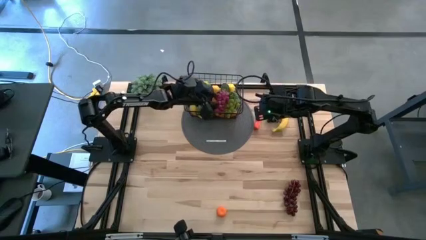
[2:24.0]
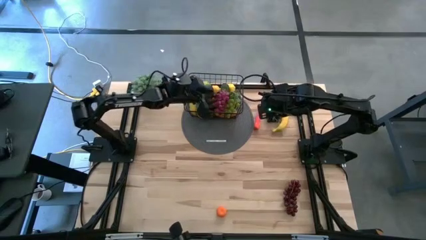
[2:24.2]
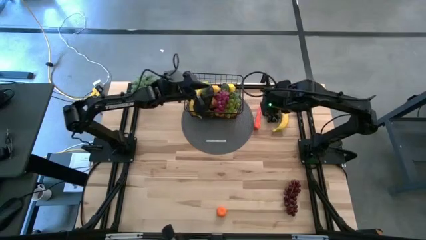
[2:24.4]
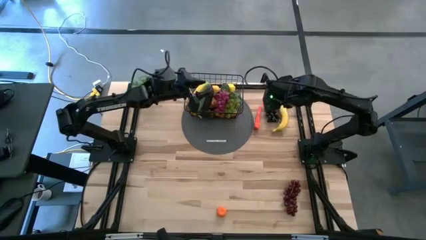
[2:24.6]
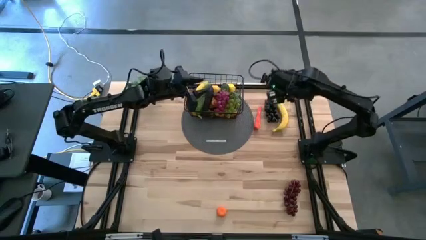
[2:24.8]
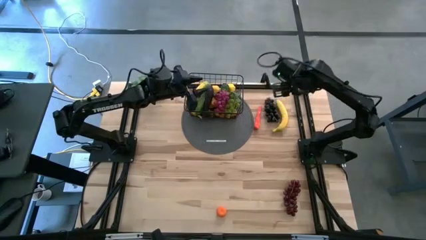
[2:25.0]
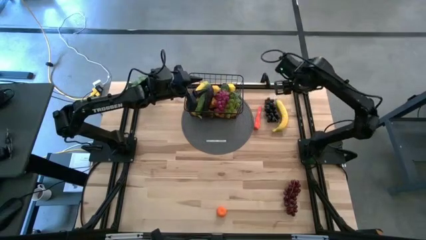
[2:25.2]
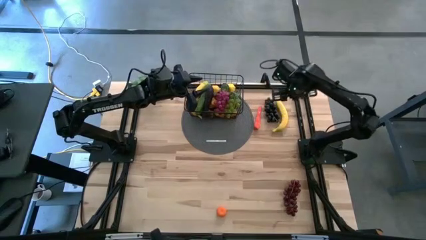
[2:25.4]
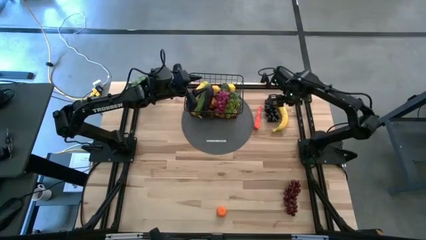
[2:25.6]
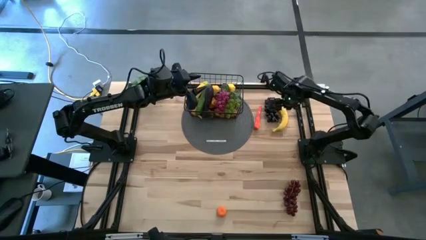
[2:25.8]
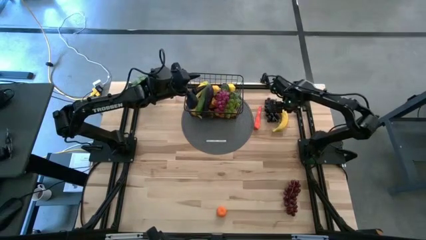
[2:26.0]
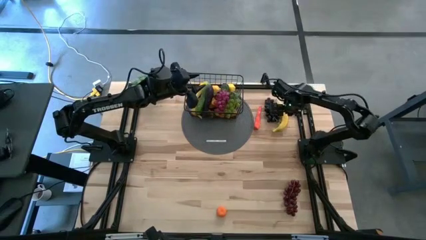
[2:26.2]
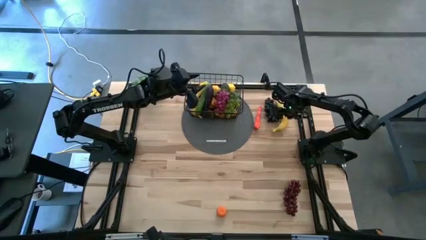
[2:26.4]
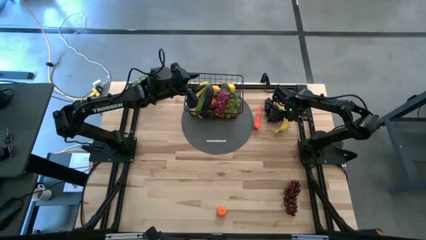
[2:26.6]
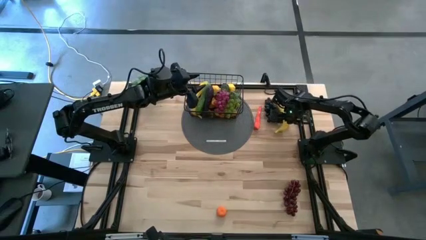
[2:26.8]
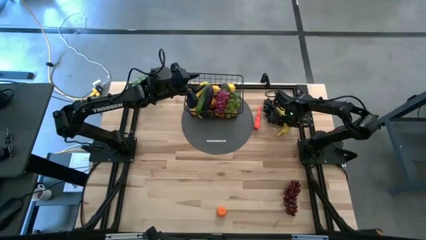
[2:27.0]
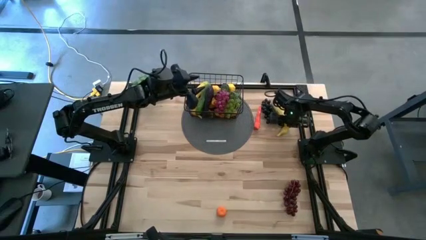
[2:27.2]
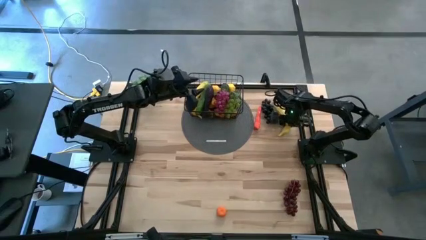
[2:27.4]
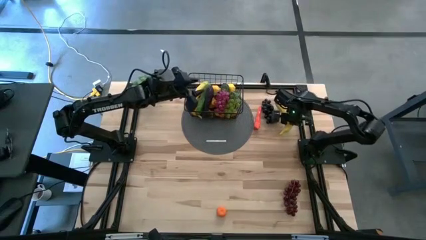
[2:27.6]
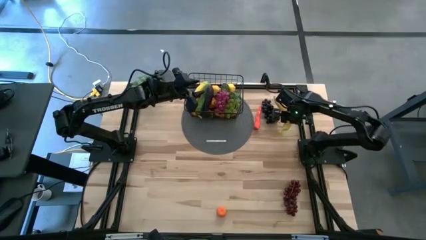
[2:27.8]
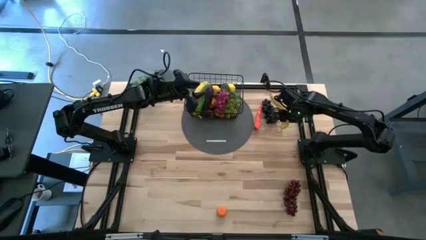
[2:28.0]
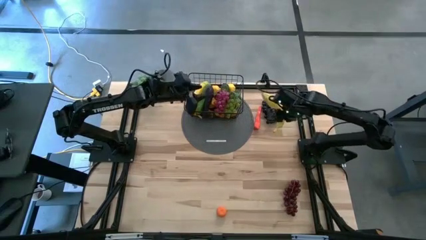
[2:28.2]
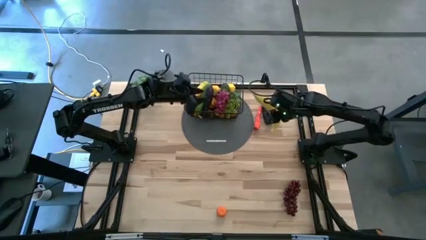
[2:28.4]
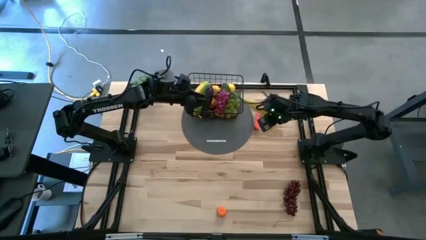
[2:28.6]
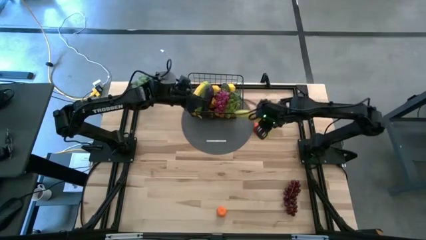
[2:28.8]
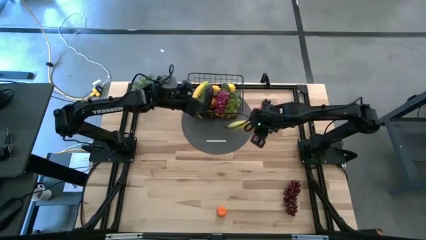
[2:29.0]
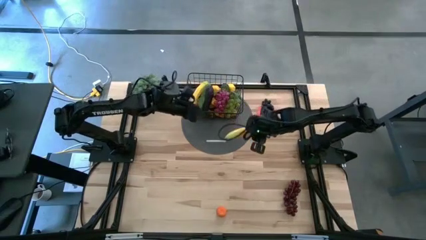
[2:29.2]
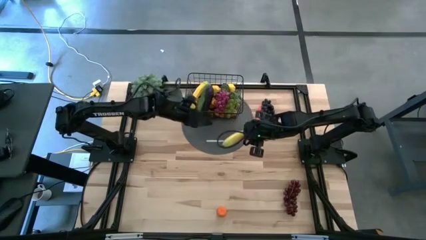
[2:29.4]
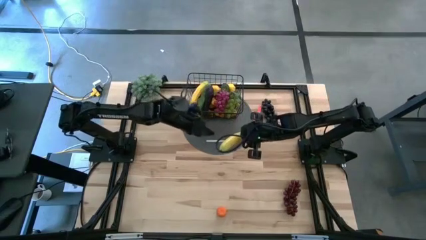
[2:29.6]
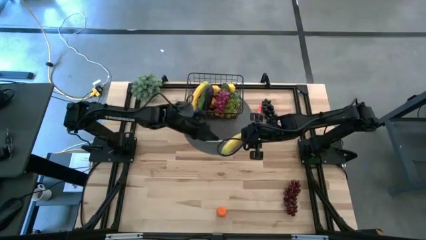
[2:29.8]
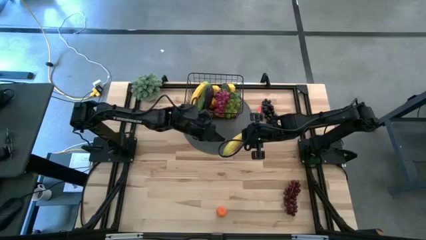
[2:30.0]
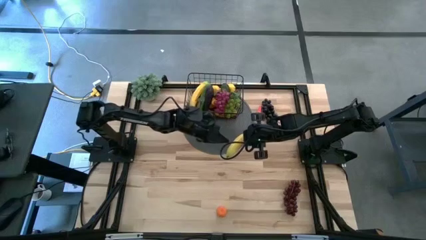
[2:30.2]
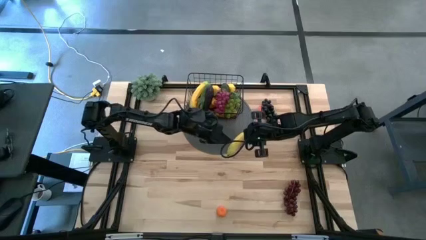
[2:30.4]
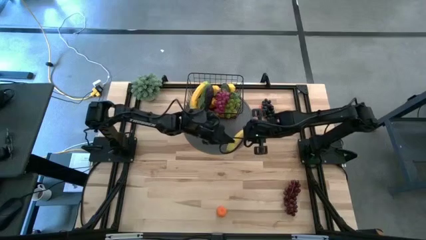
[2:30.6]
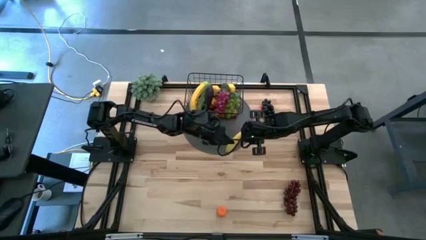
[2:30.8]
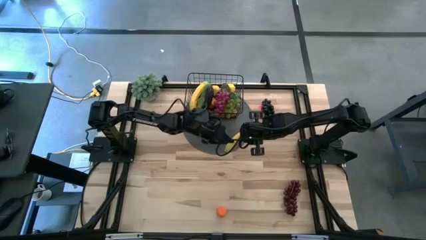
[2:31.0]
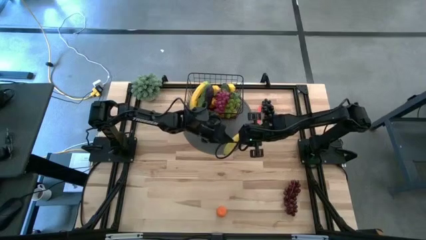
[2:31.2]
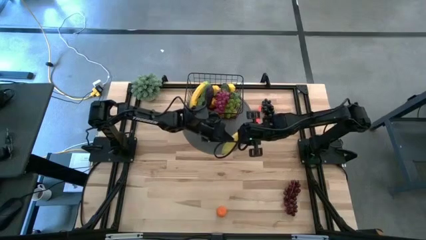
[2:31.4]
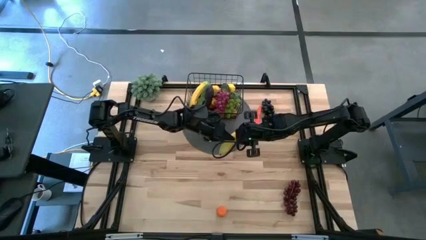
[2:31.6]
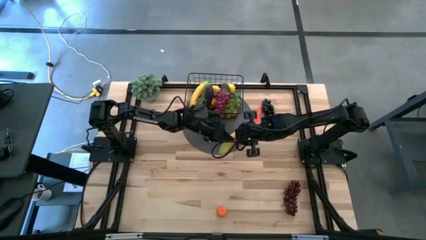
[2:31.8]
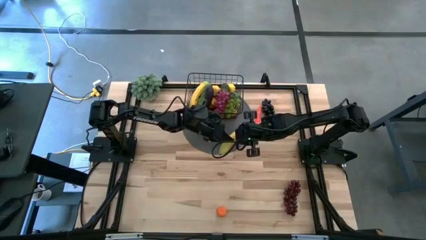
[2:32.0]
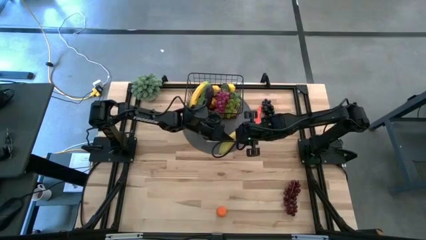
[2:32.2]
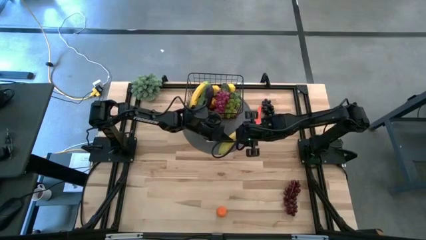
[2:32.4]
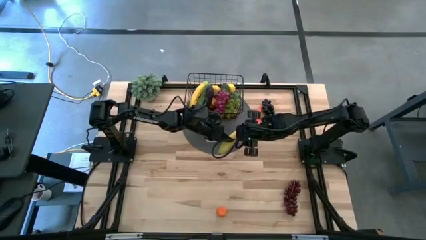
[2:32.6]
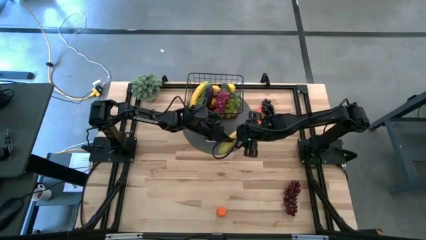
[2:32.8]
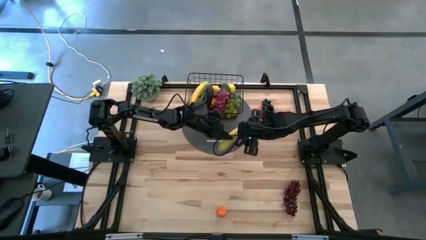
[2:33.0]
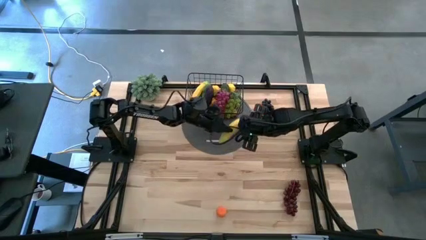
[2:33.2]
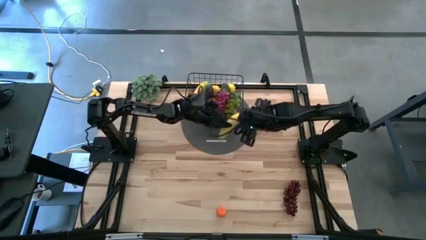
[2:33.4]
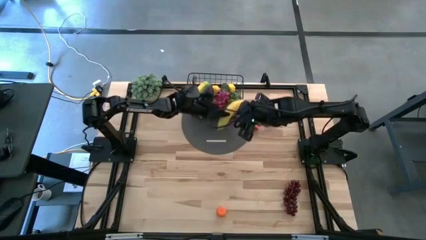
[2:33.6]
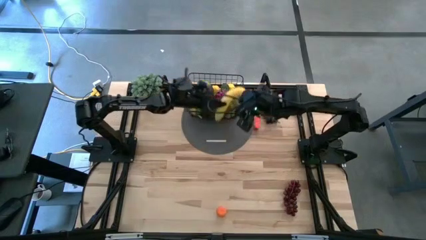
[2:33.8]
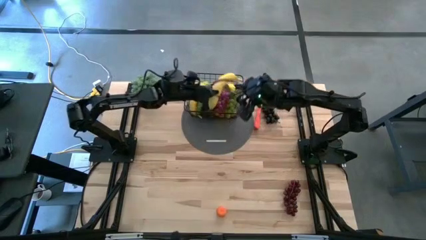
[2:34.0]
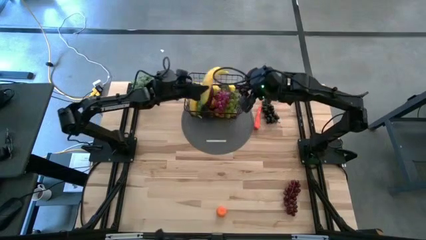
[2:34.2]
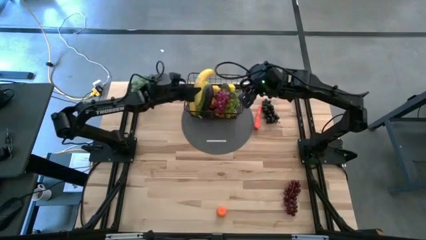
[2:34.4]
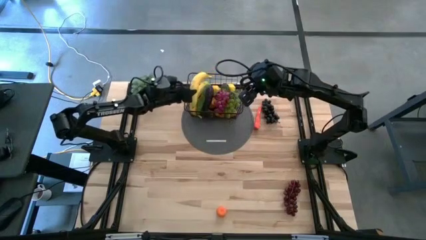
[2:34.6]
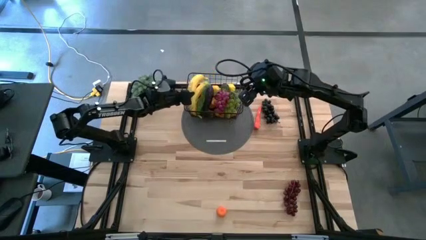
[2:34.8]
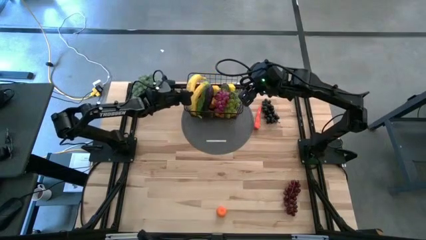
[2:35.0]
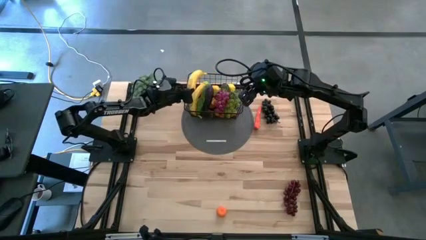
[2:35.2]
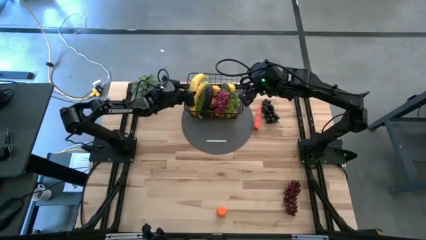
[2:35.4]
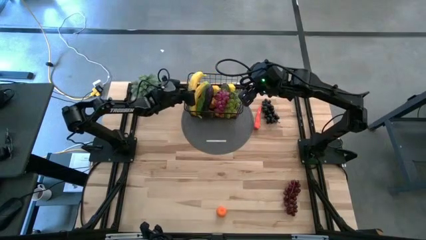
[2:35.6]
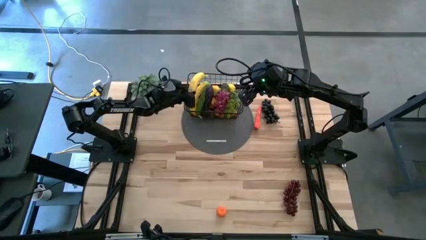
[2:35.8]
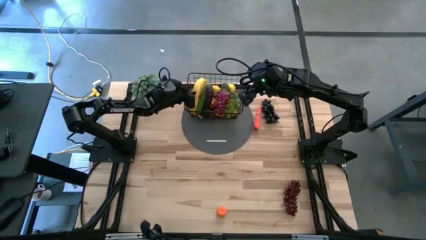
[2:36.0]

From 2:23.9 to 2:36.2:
Task: Build produce basket
Put the banana into the black wire basket

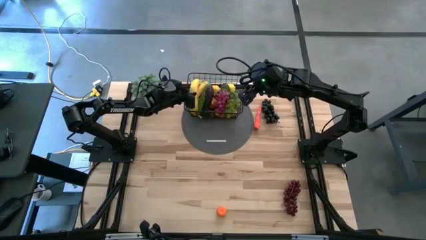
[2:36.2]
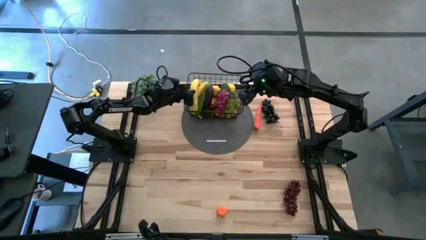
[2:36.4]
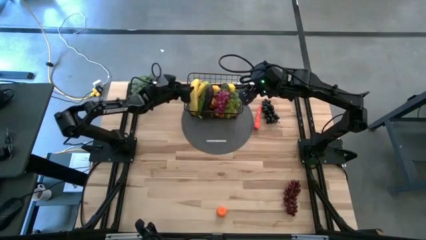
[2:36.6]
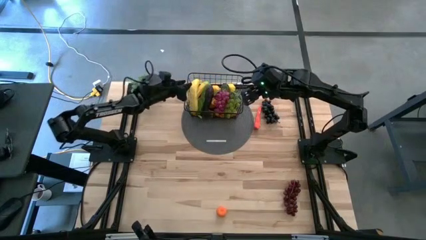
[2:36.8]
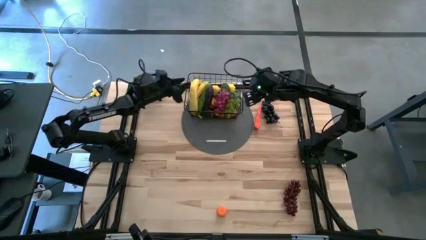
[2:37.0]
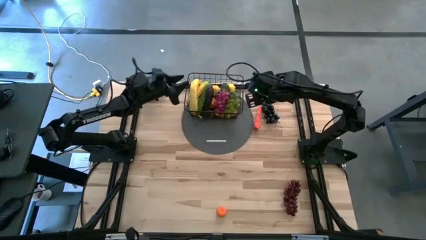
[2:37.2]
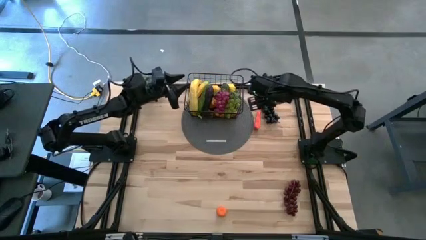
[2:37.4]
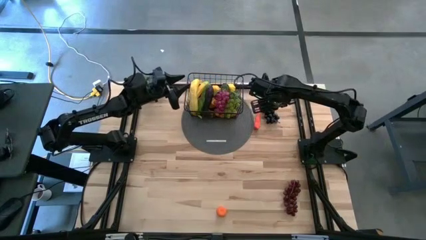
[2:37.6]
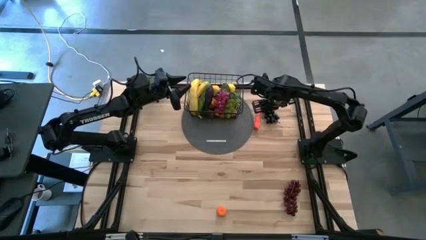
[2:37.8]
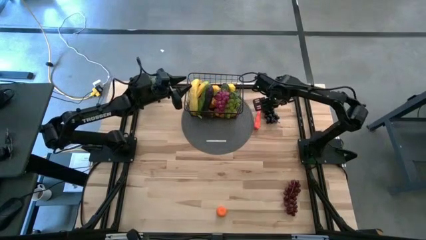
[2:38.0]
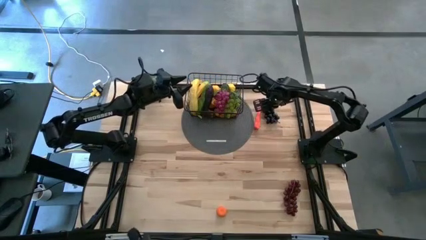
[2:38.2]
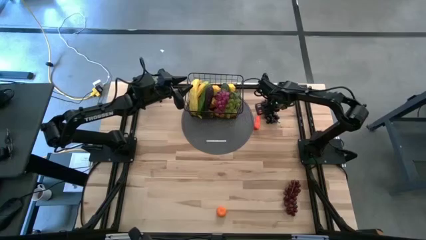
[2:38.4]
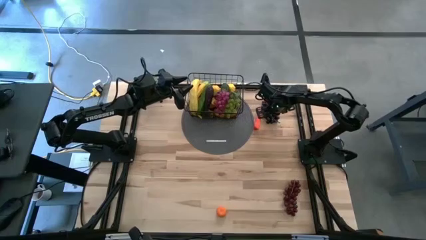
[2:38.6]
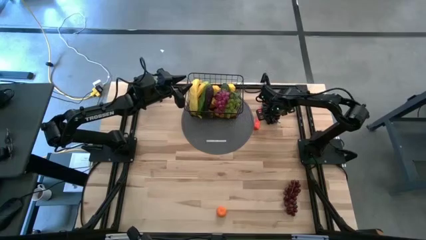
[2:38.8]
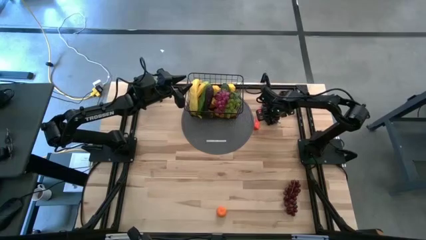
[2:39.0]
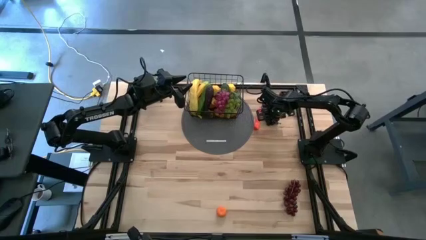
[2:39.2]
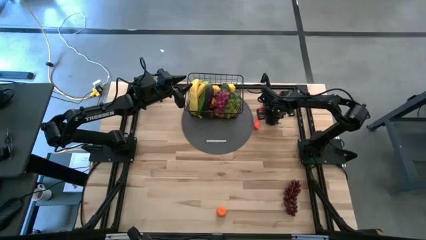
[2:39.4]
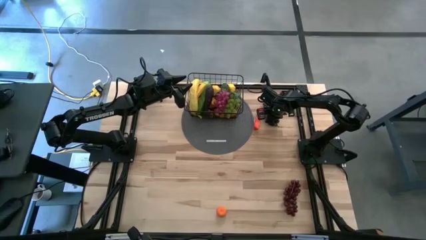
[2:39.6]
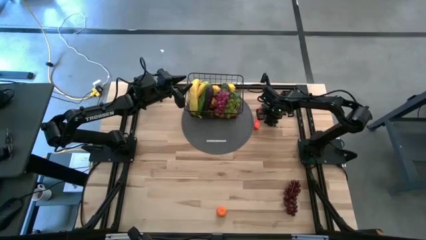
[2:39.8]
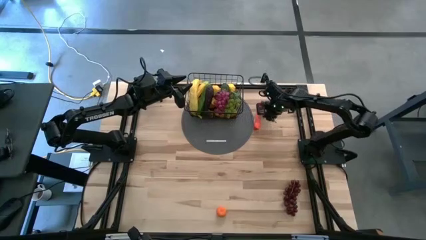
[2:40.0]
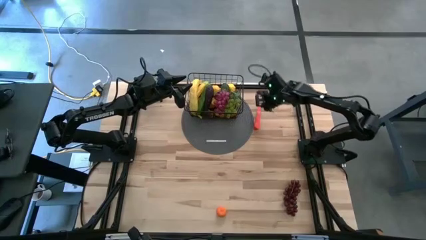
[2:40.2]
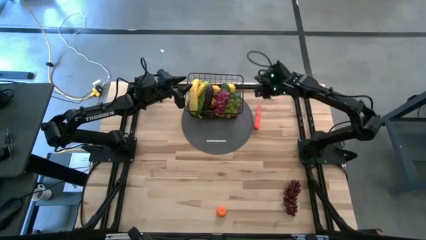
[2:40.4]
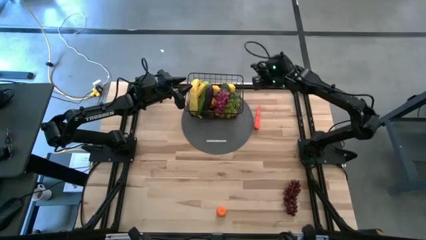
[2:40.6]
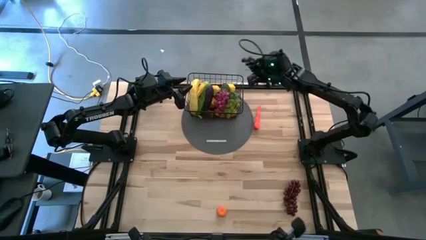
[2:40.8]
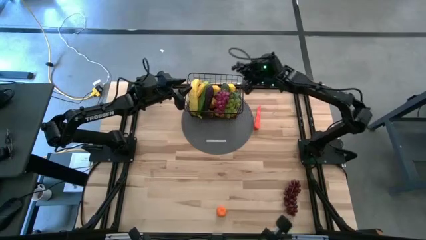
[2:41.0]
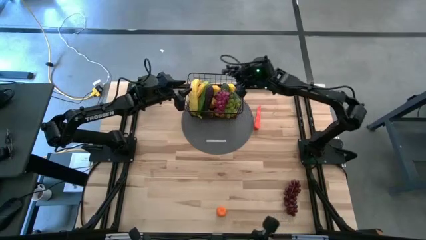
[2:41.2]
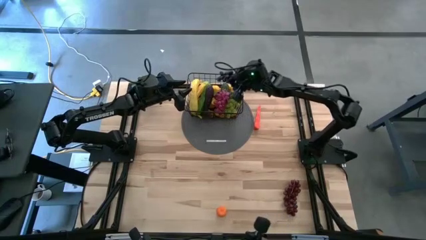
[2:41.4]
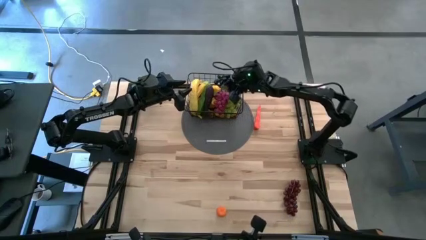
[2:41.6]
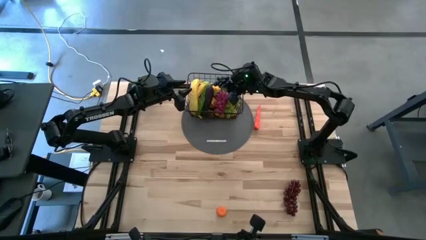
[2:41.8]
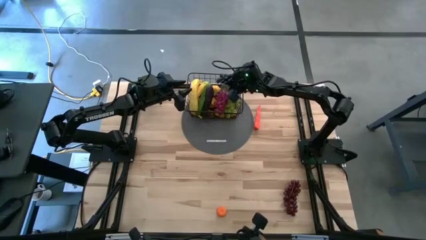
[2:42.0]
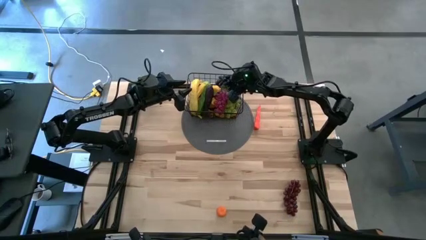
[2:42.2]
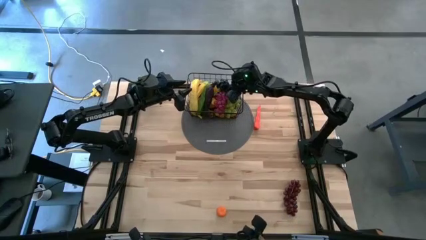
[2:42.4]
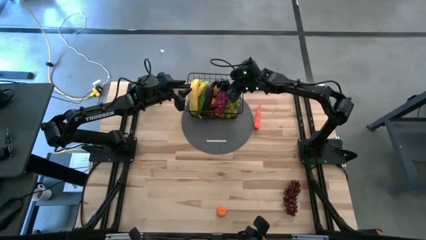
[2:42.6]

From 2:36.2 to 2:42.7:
Put the grapes into the black wire basket
